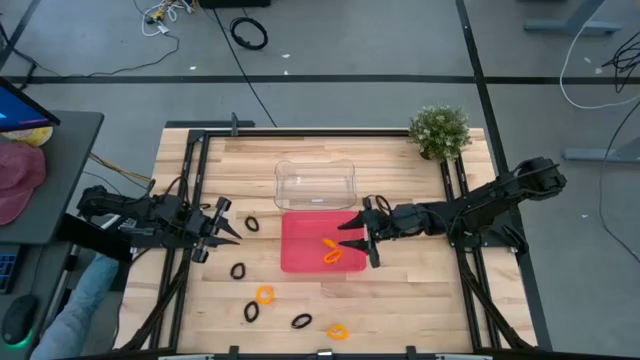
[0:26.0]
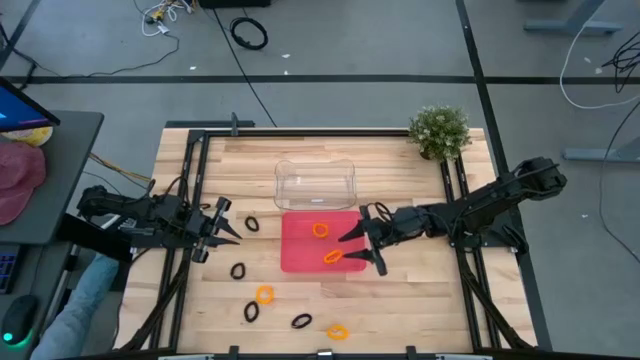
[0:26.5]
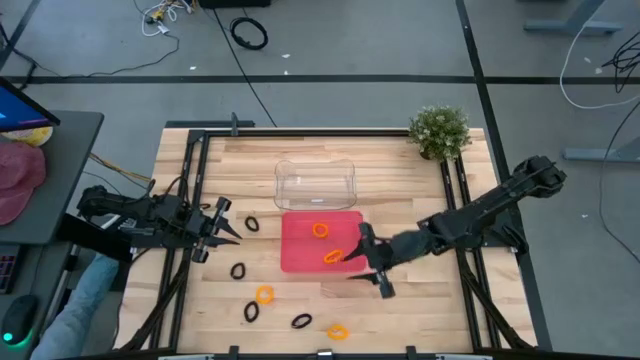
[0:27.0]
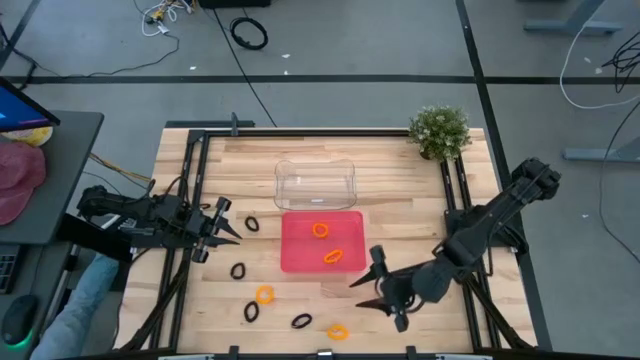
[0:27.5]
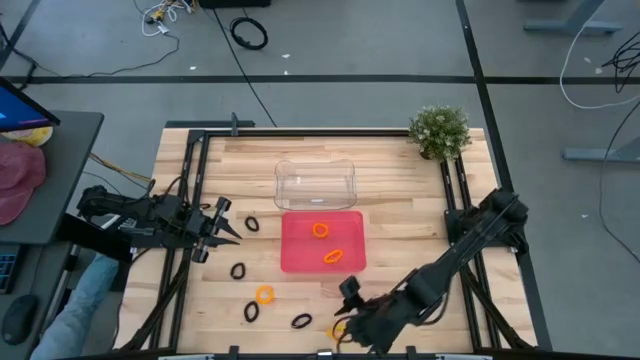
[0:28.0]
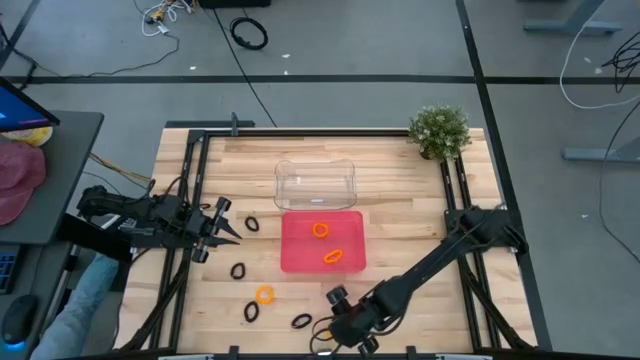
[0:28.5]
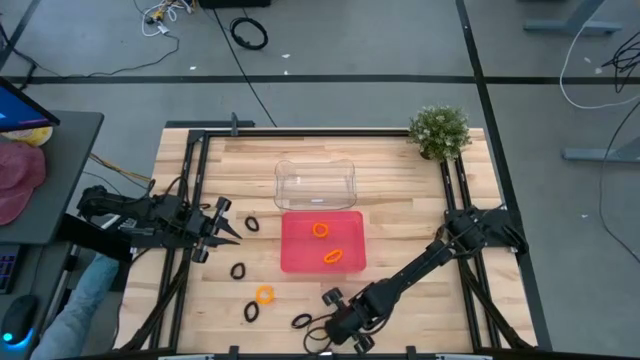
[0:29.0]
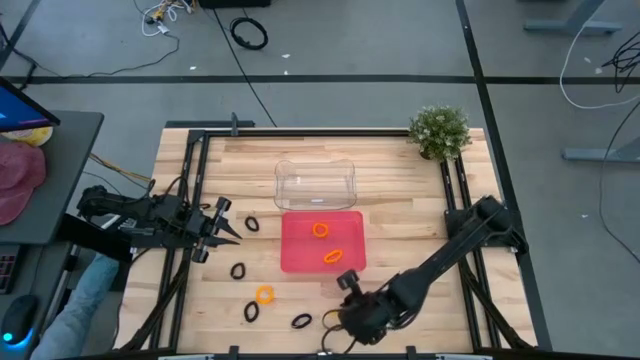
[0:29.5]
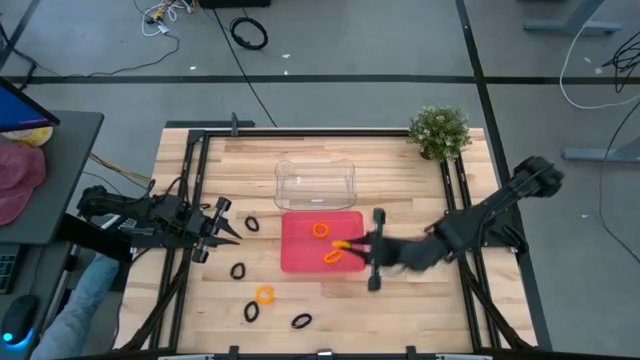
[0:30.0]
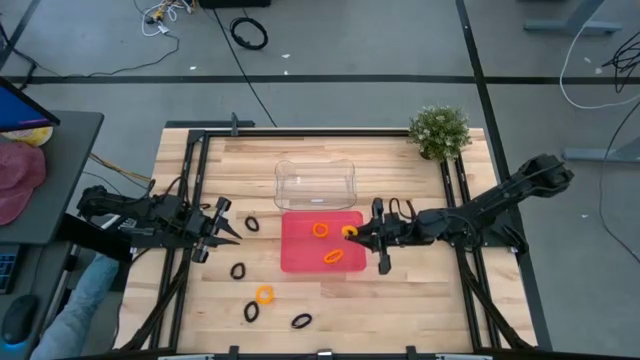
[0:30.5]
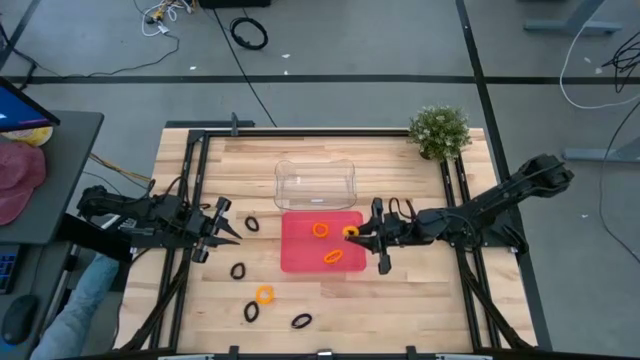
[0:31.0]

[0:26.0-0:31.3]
Task: Sort spring keychains
Put the right orange spring keychain into the pink bin

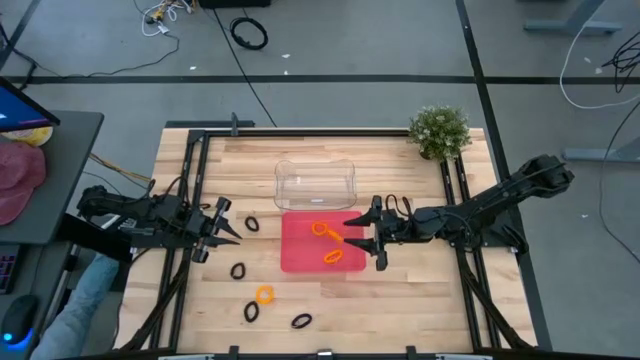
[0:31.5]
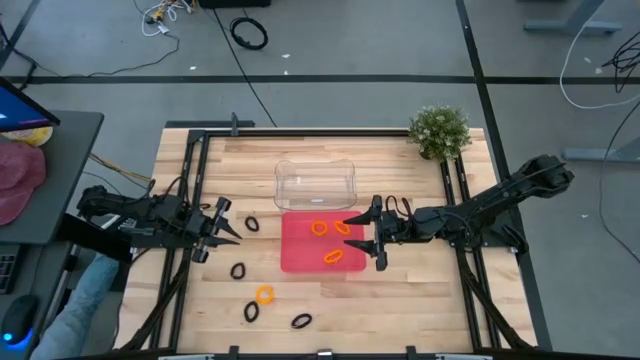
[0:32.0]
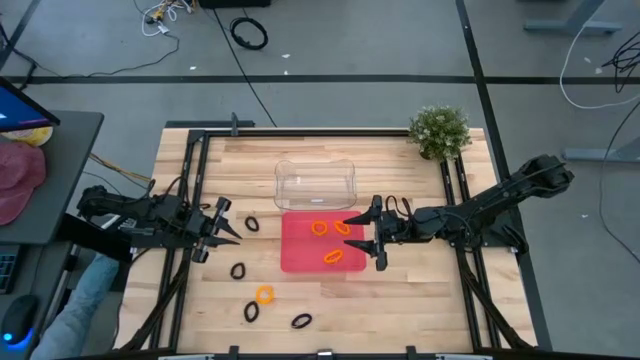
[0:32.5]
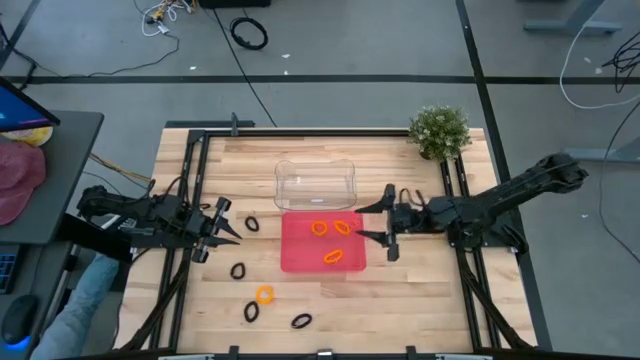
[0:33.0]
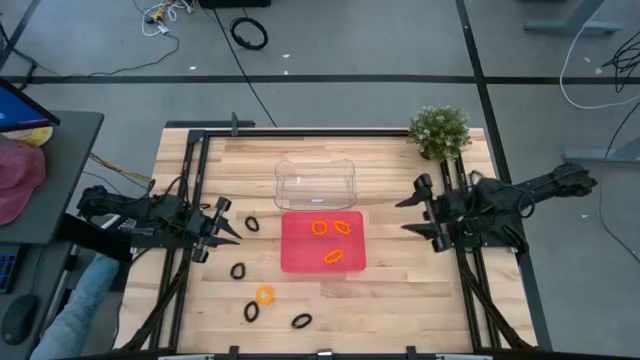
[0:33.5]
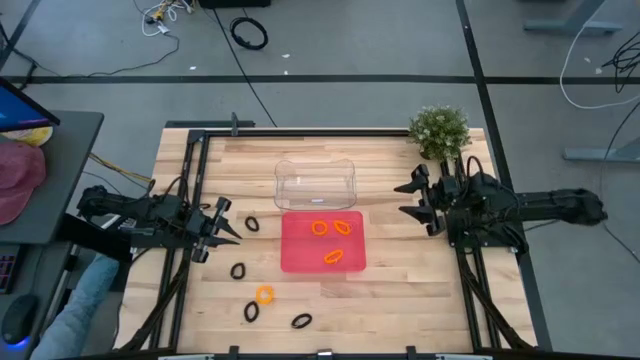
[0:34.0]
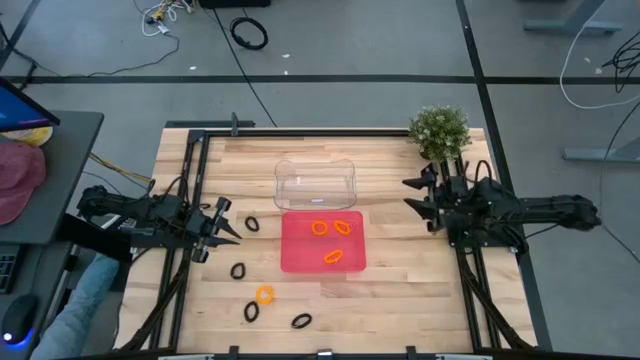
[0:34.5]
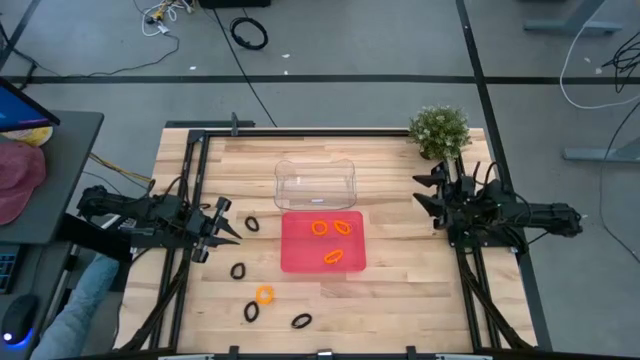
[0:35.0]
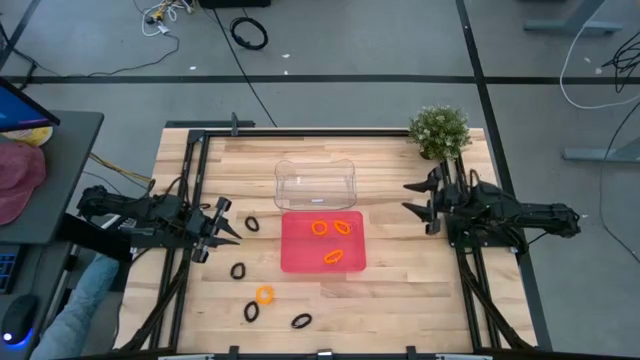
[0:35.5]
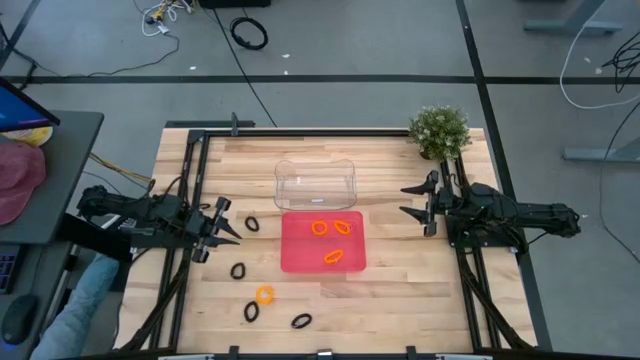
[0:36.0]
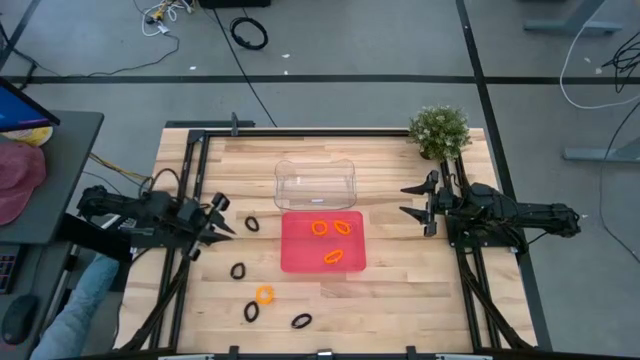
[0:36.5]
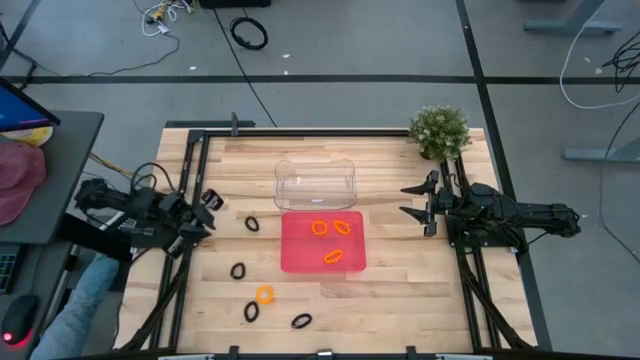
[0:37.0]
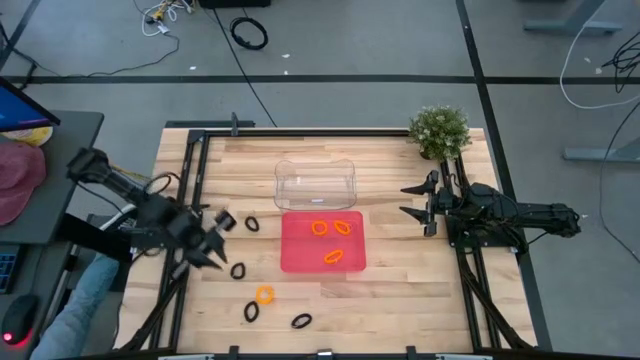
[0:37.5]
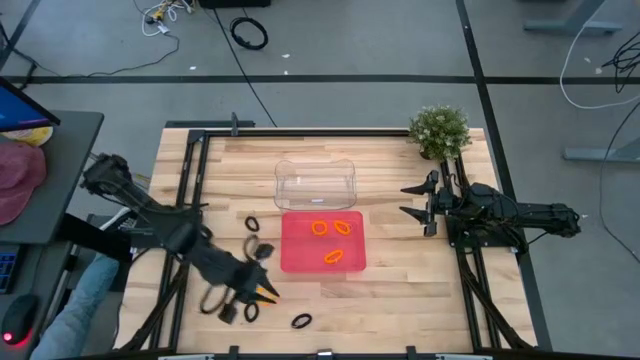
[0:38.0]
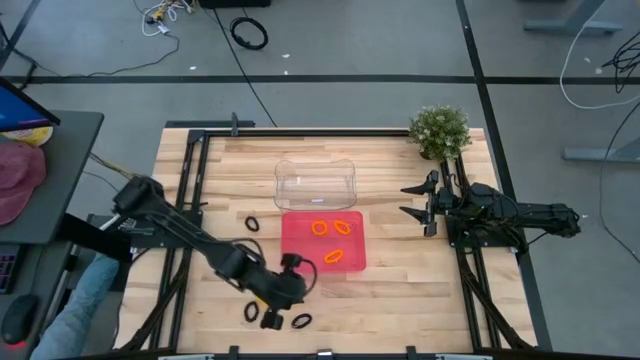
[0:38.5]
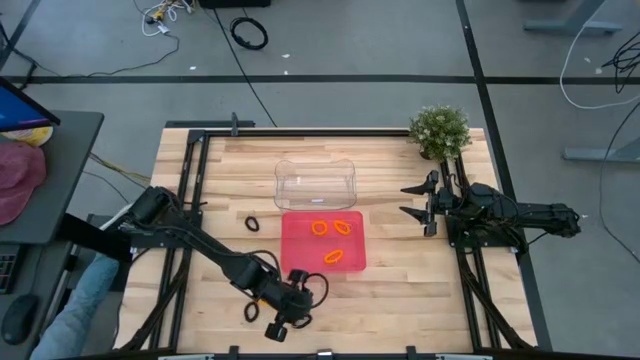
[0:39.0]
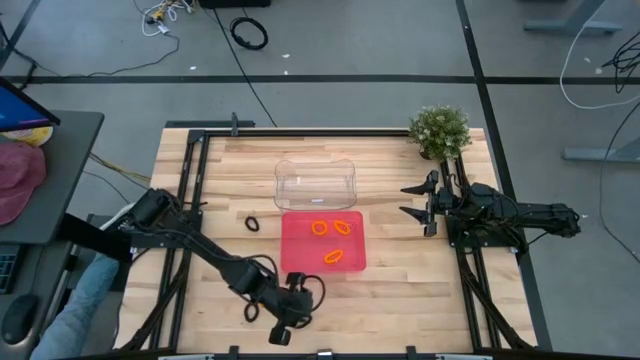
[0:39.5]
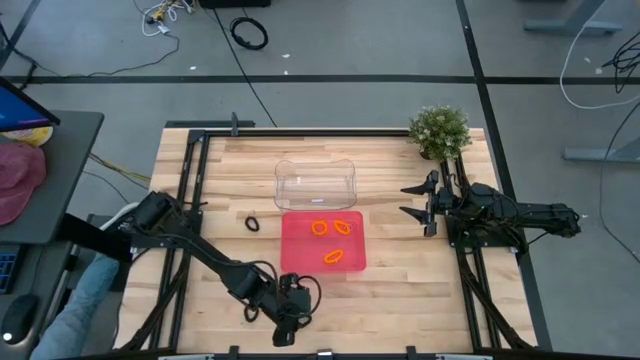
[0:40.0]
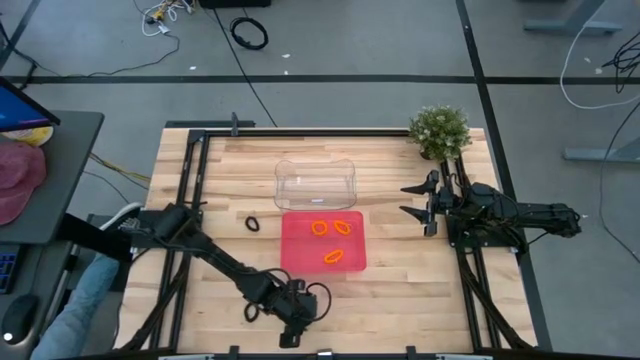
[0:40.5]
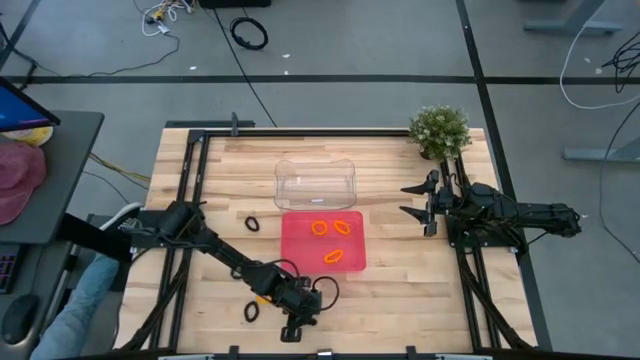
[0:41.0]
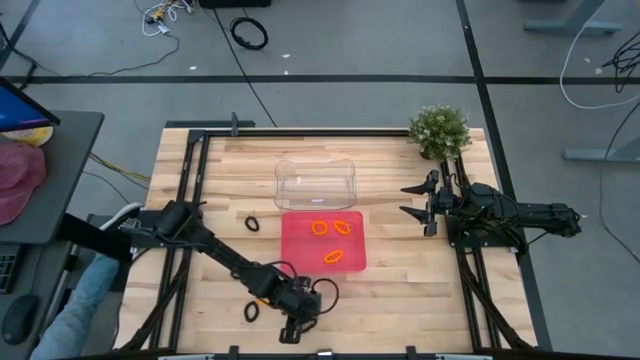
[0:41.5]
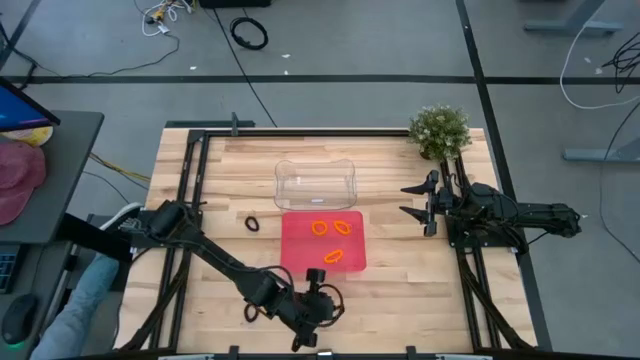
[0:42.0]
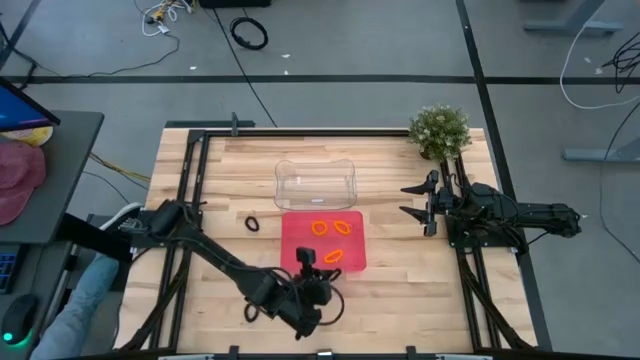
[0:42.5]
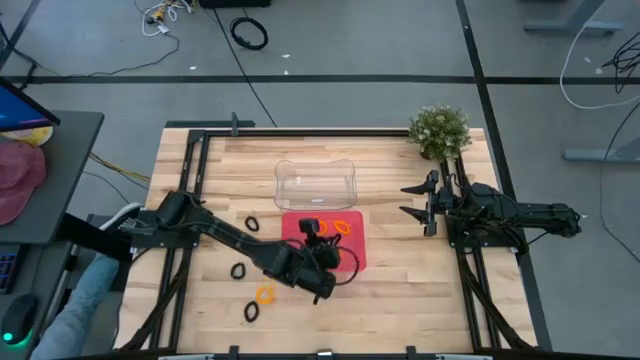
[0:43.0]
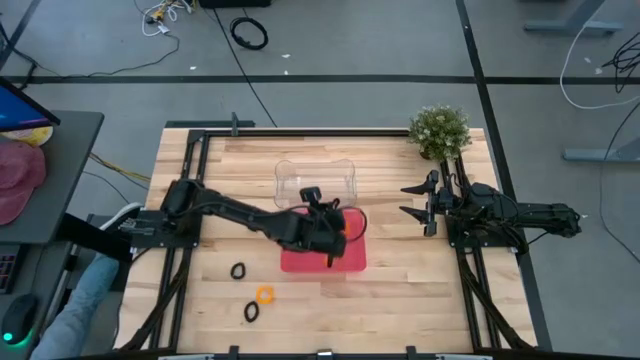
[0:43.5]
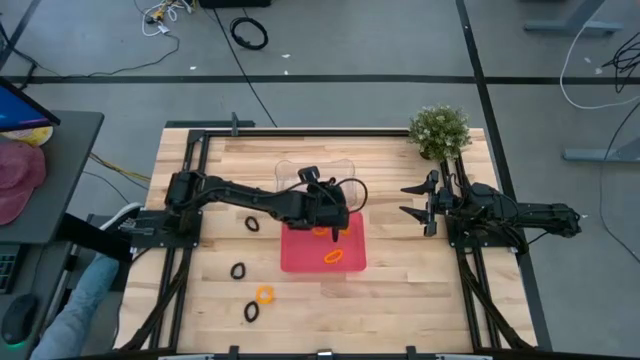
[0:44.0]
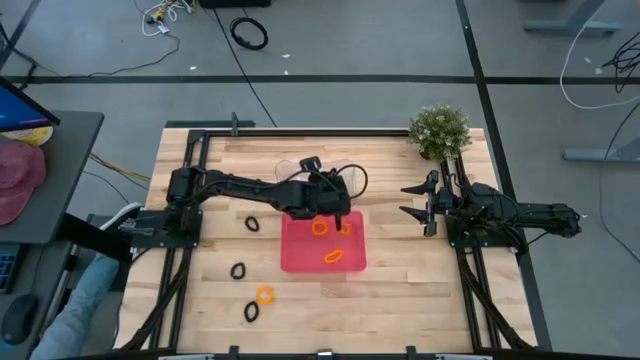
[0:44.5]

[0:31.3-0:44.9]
Put the bottom right black spring keychain into the transparent bin

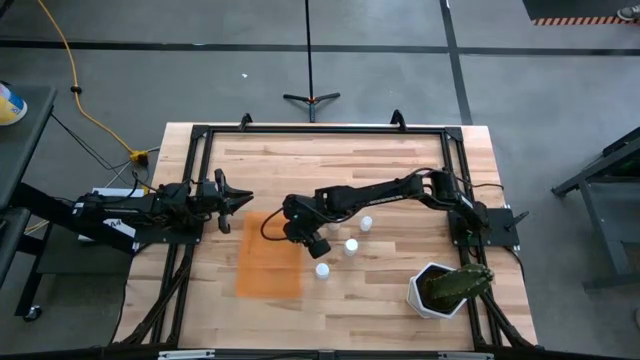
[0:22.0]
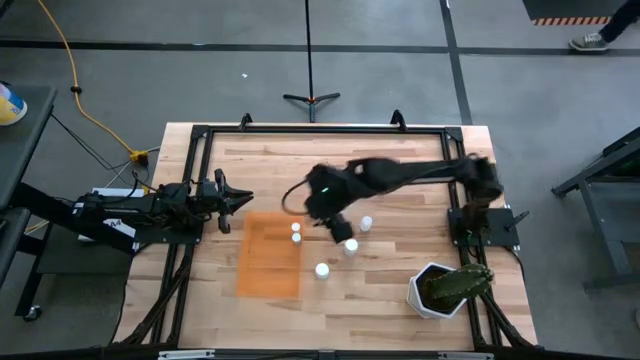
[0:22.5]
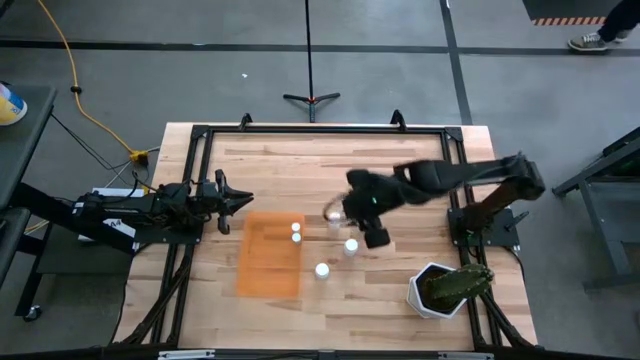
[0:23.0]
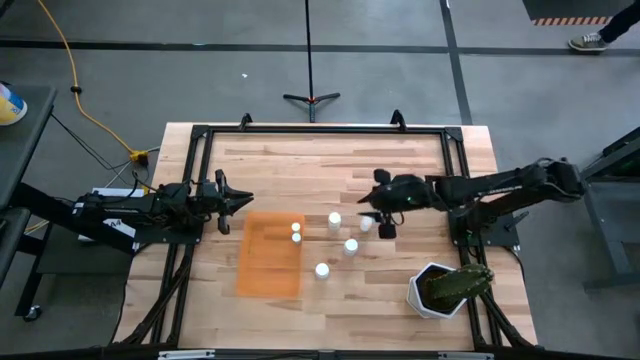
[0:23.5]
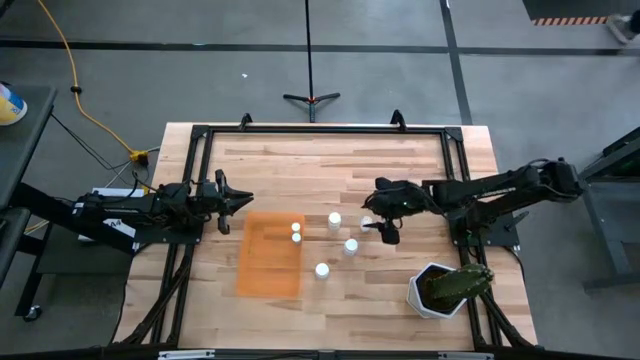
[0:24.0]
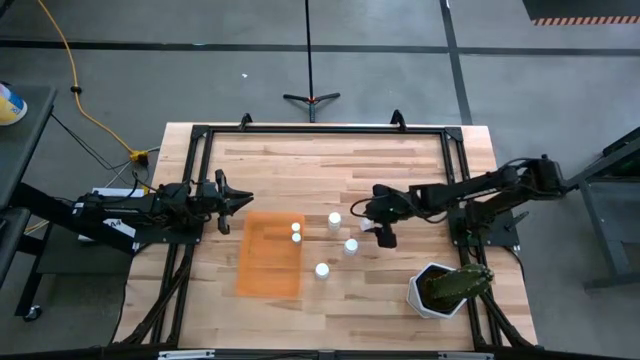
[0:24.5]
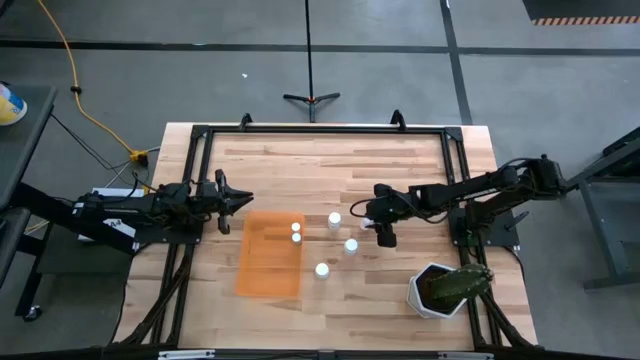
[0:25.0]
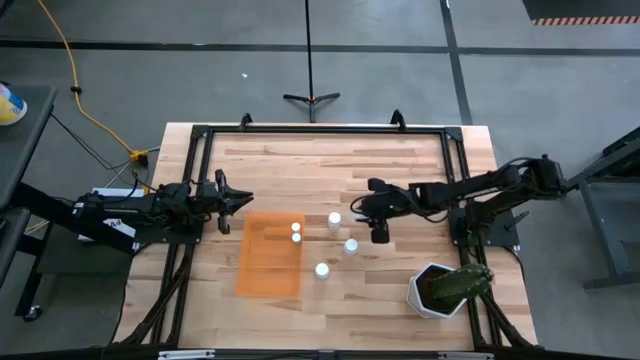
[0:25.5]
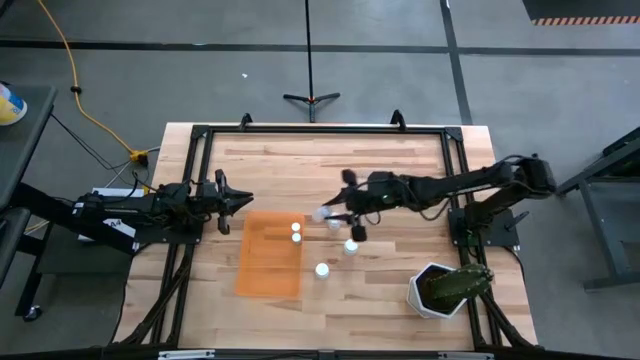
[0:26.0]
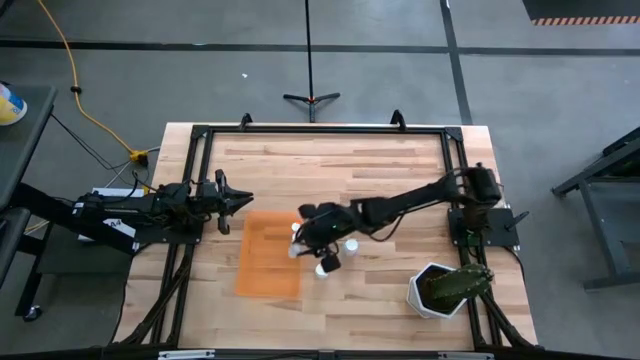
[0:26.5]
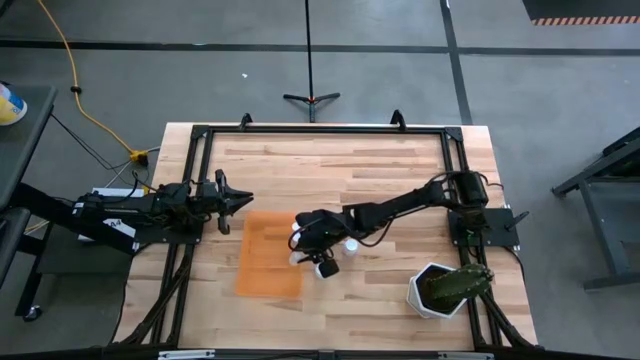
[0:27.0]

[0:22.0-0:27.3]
Task: Pick and place pill bottles into a basket
Put the transparent pill bottle into the orange bin
